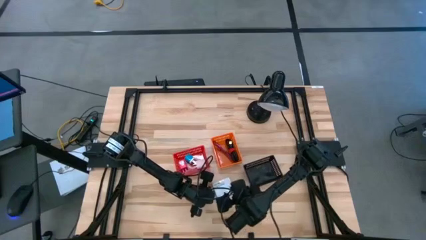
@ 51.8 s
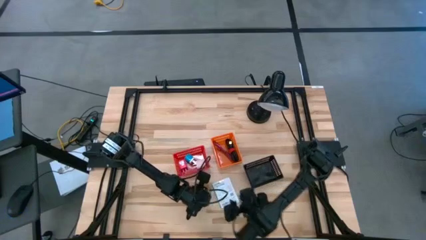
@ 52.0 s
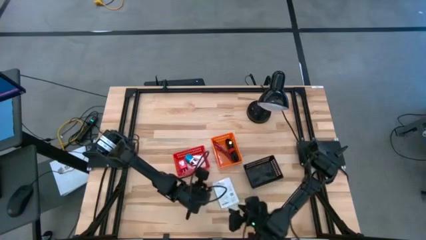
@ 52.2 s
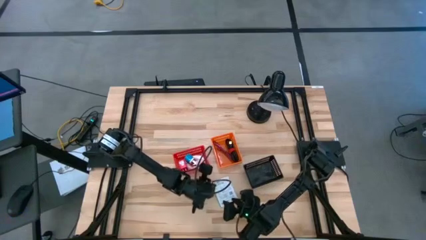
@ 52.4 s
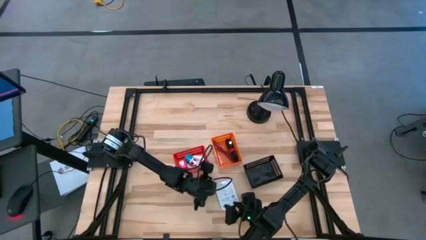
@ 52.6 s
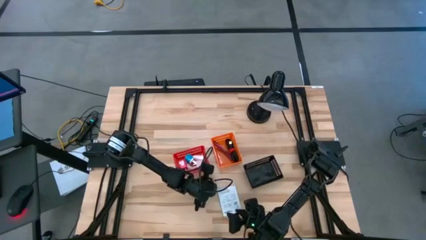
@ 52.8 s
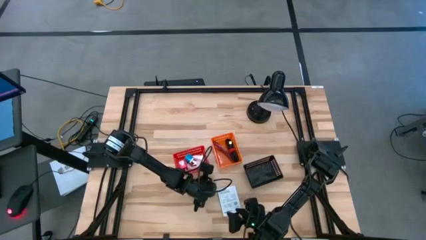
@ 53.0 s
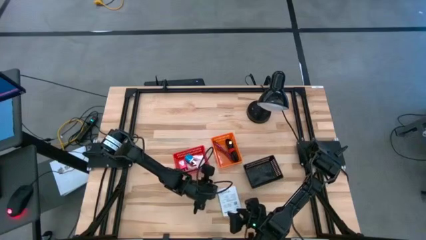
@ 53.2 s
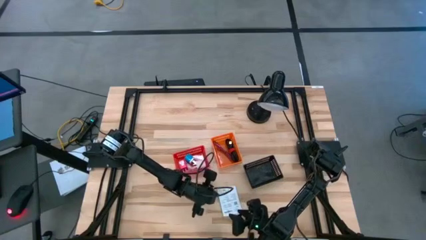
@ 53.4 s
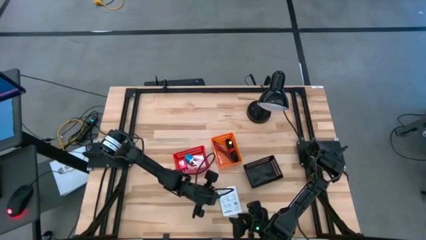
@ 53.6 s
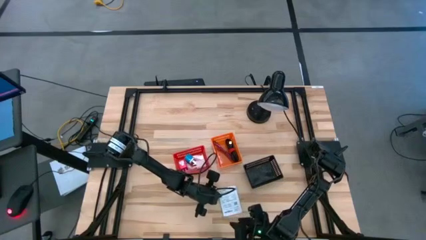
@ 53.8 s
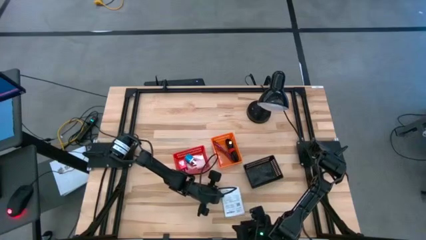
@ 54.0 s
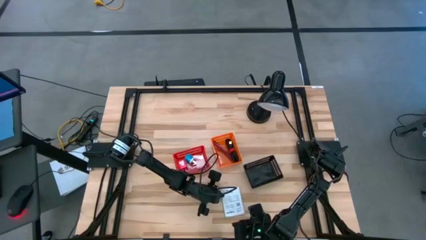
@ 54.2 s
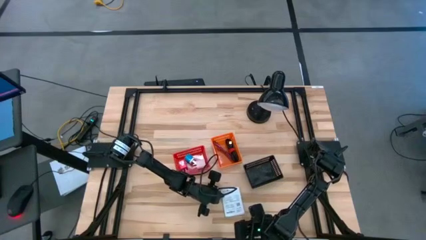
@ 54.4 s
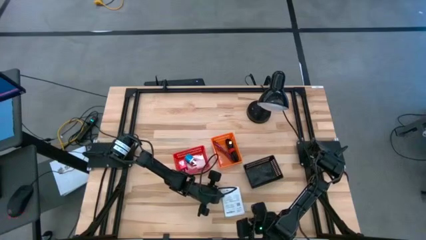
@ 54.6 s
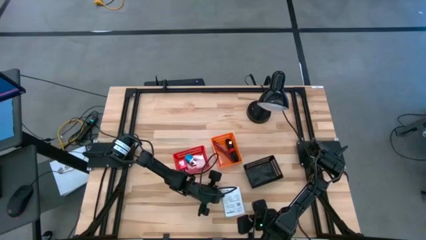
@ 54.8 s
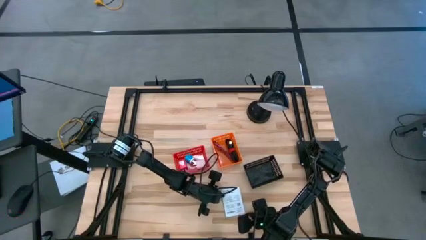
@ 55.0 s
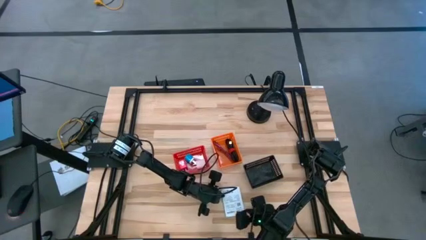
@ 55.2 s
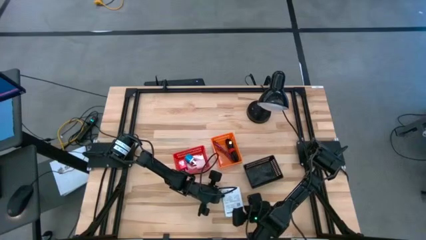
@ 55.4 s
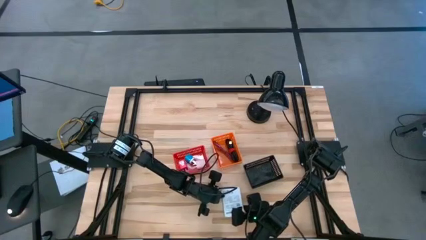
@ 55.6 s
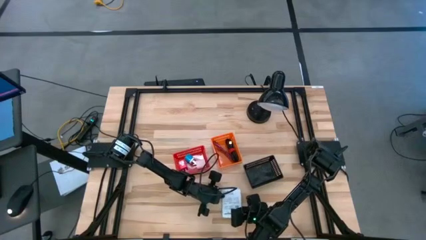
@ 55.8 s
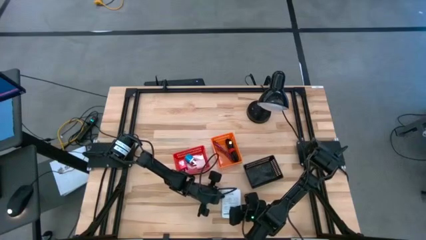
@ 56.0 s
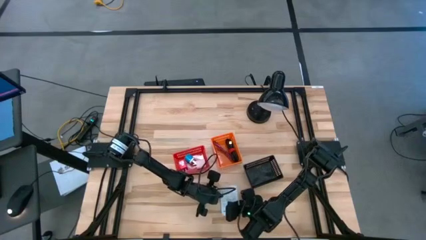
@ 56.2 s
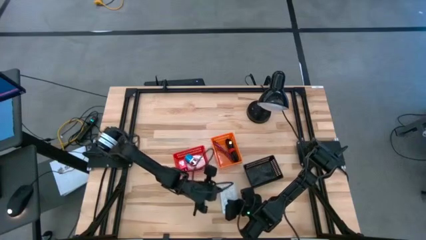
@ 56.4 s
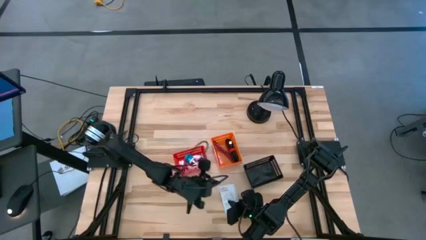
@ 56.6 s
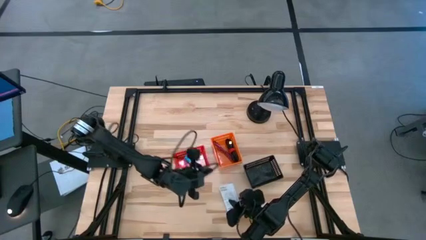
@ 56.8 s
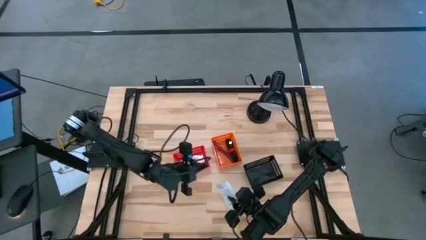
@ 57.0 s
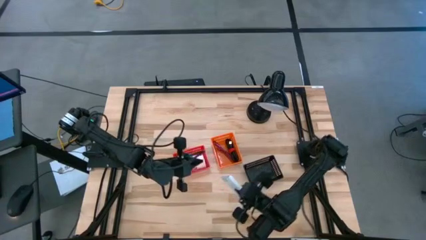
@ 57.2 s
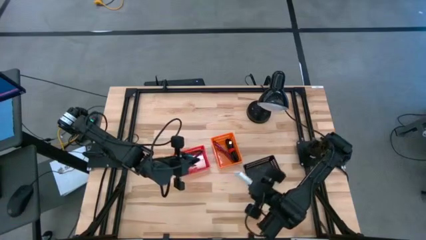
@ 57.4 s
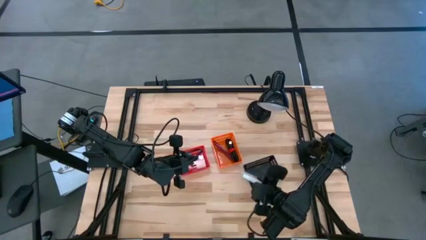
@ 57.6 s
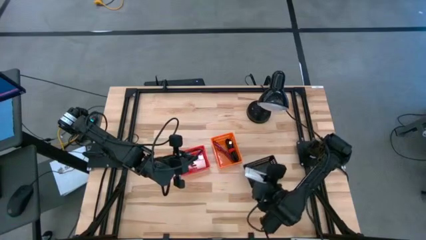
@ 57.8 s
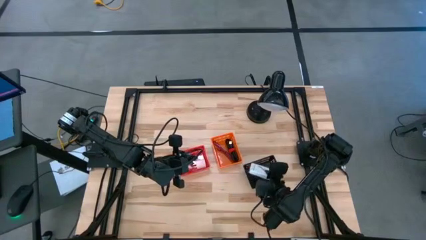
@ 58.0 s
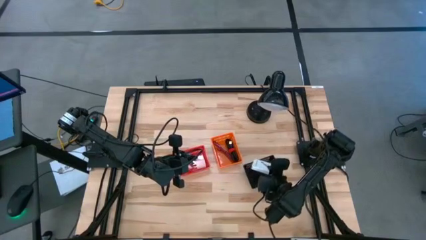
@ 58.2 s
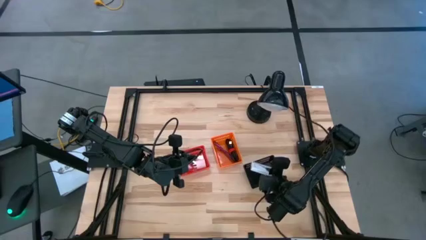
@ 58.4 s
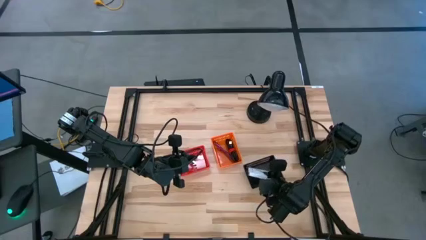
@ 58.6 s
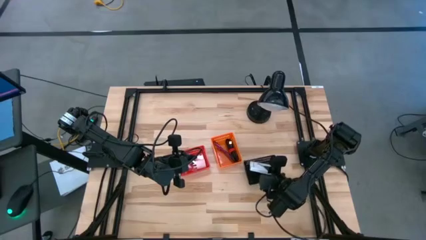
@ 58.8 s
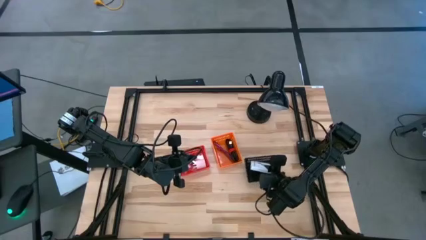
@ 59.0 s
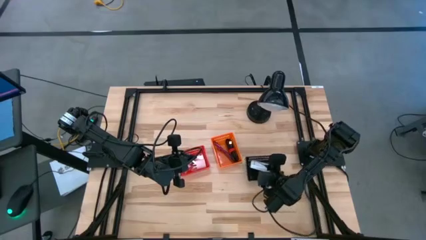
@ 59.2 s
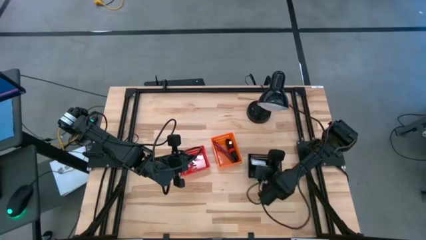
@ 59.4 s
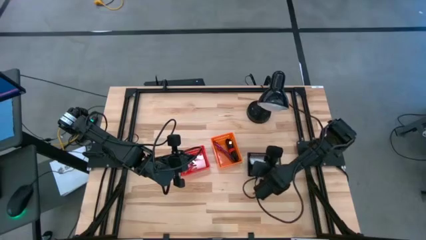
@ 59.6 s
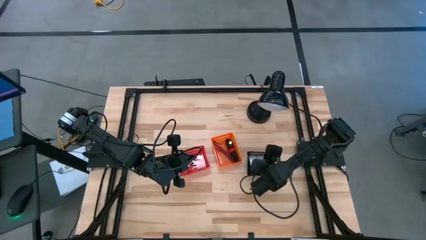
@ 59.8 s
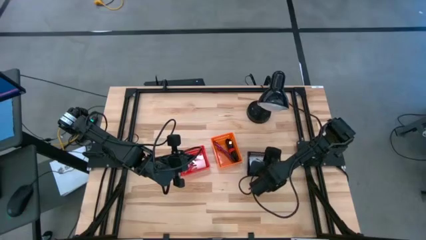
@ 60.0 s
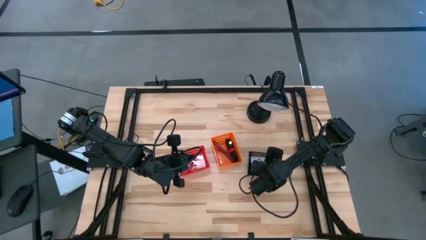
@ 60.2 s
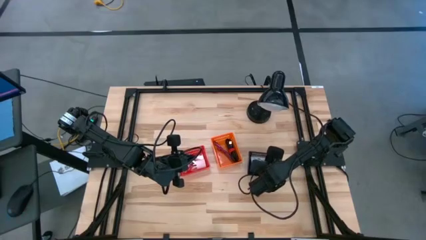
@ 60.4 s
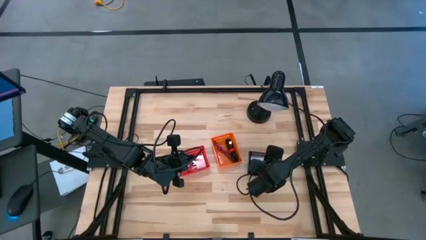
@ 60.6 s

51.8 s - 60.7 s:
Task: Pick and place items into bin
Put the white card reader box in the black bin

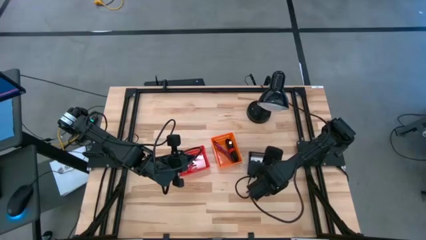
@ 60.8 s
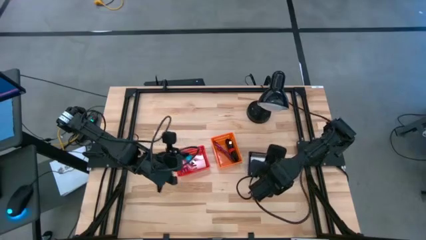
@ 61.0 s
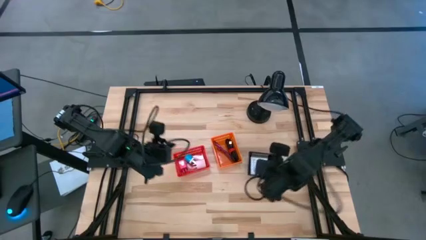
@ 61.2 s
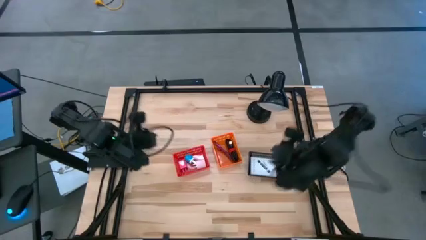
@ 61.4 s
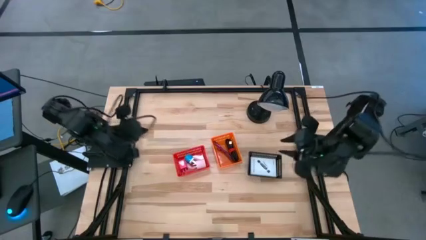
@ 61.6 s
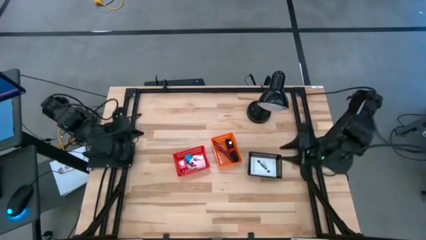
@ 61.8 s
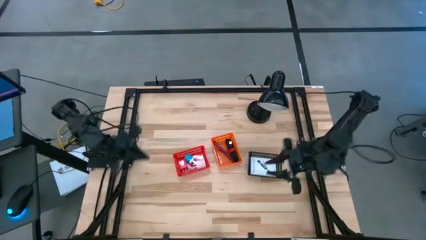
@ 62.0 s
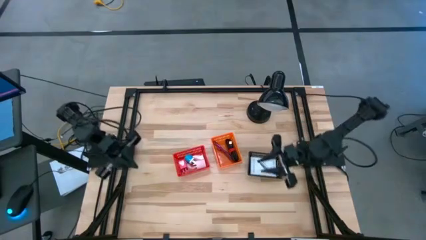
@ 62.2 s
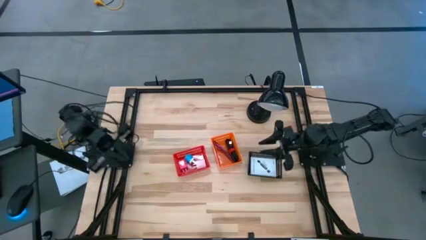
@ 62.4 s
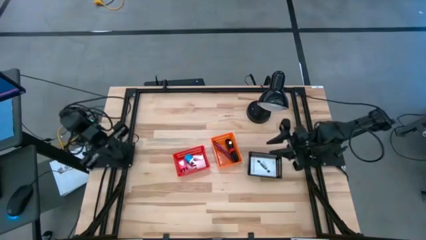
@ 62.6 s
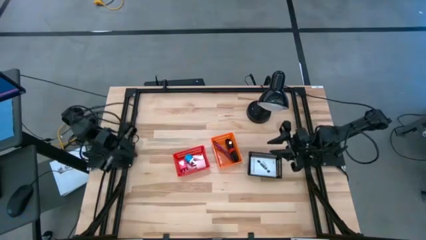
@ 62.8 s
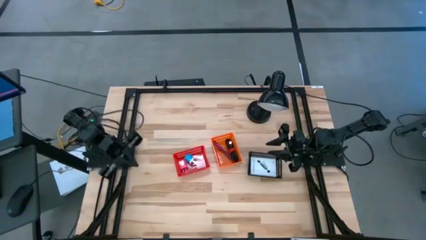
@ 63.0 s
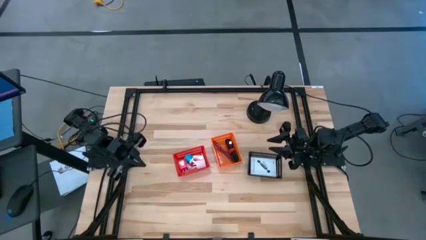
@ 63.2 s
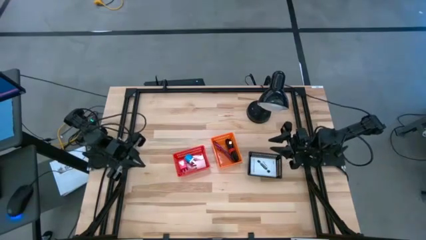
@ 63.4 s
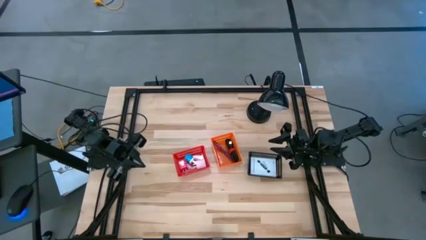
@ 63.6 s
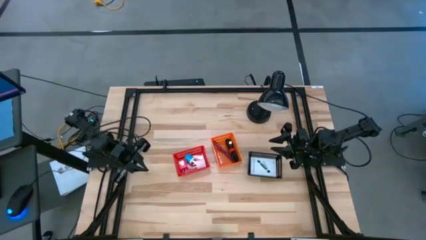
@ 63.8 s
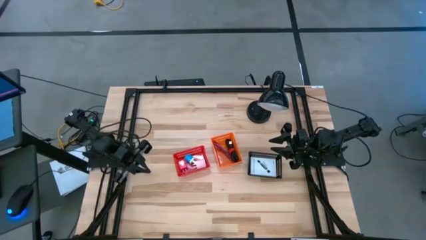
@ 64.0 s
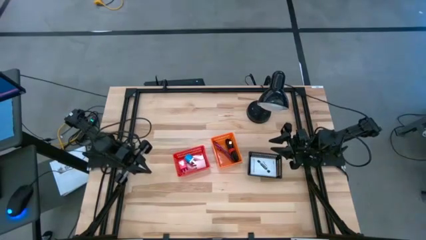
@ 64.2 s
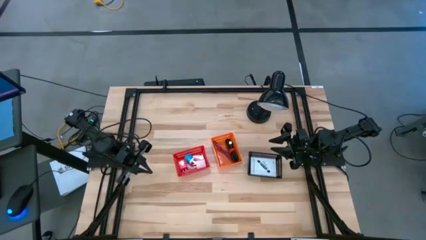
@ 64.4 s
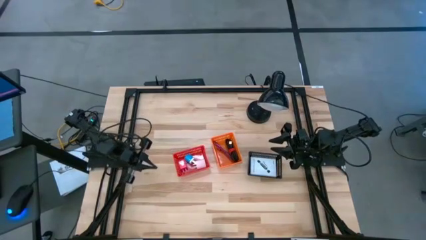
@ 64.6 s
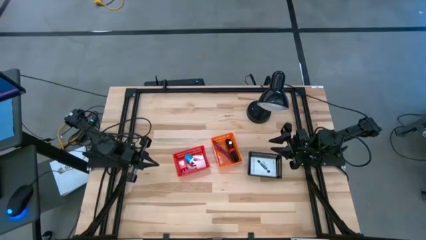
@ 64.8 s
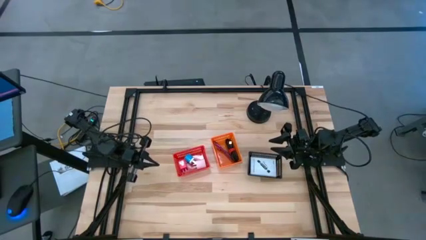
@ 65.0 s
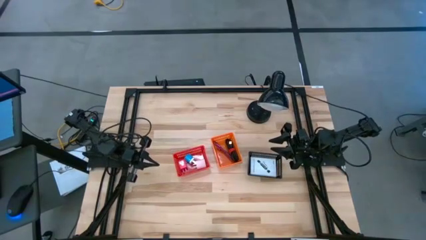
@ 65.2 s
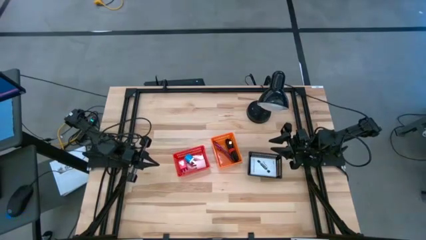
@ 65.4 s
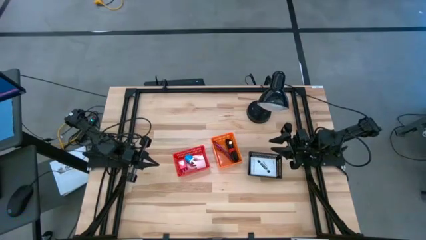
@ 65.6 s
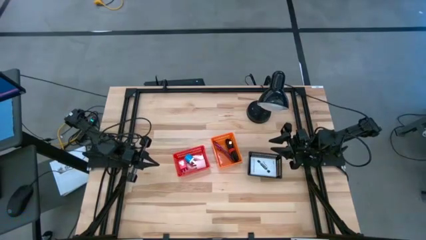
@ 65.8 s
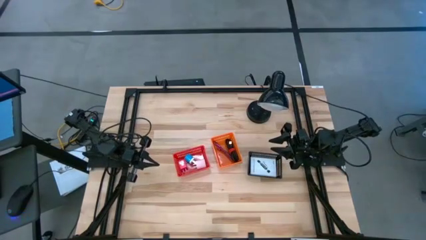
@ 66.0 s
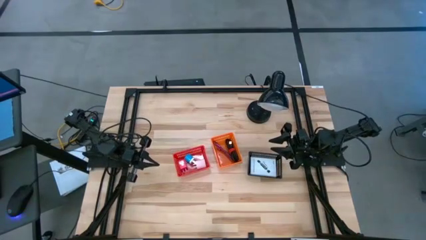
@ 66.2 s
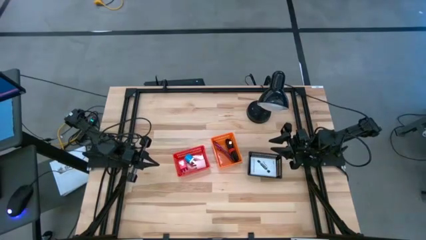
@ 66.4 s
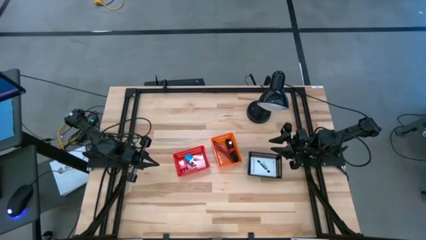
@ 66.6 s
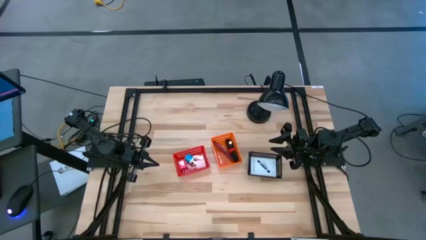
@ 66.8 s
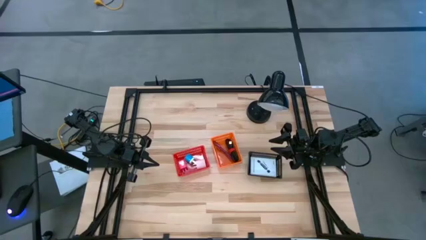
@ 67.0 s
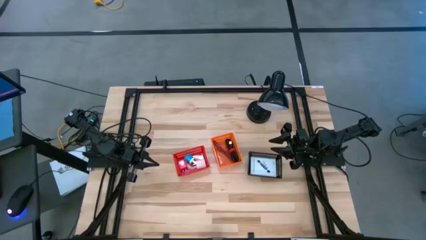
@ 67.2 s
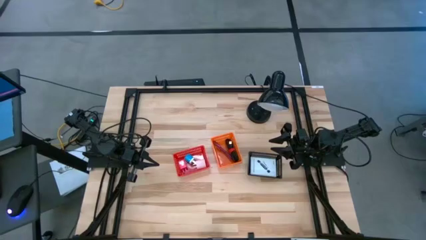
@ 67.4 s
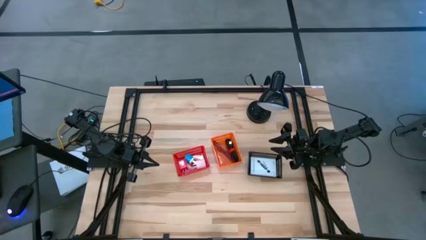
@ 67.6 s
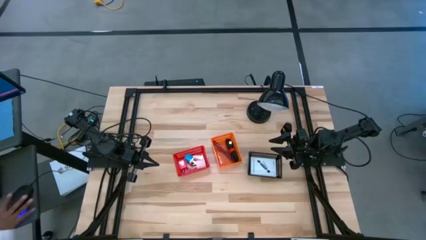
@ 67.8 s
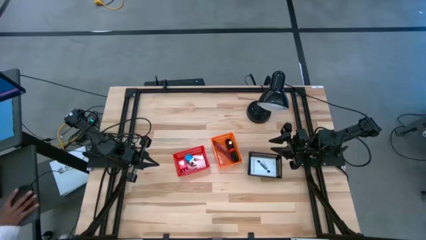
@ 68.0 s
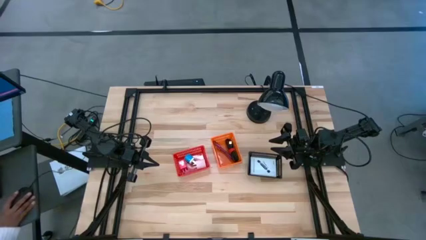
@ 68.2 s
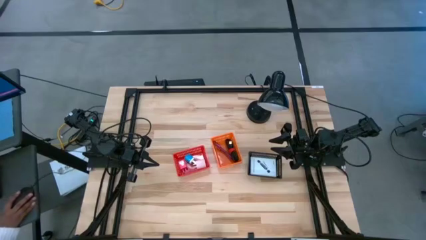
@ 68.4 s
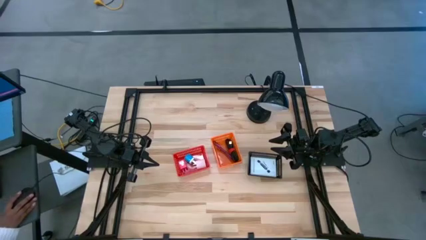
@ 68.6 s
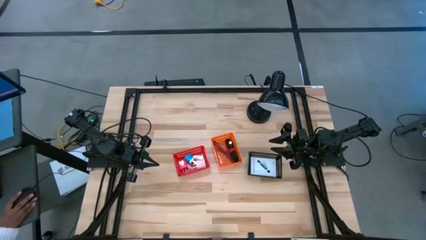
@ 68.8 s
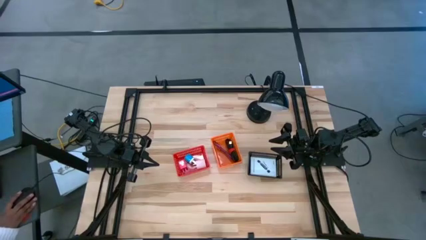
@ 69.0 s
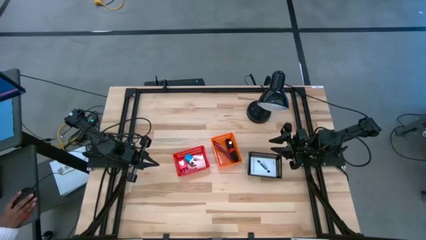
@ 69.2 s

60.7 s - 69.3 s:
Return to Home Position
